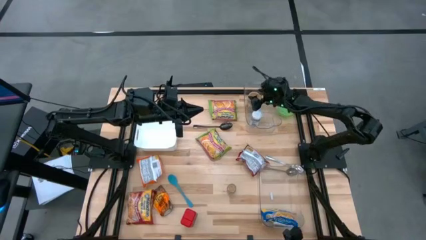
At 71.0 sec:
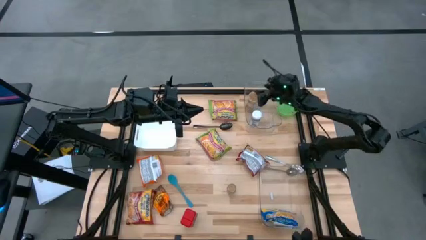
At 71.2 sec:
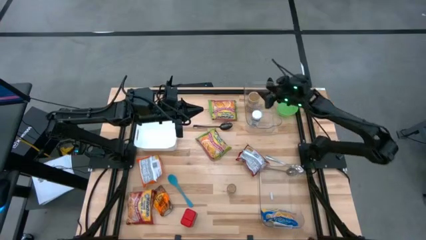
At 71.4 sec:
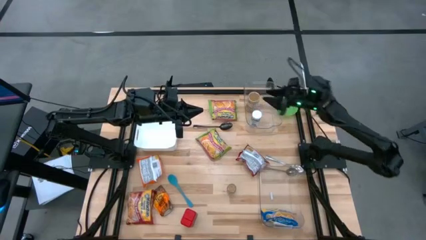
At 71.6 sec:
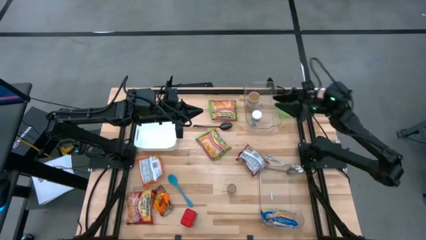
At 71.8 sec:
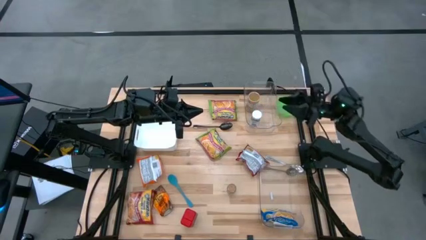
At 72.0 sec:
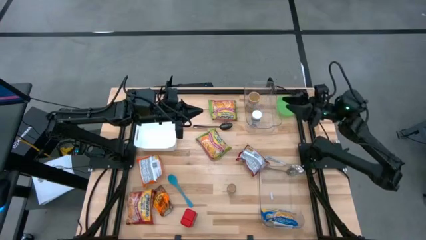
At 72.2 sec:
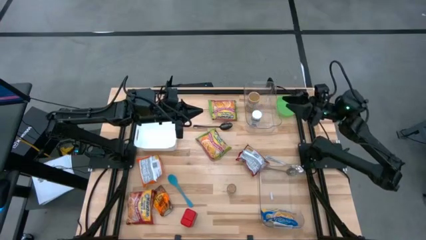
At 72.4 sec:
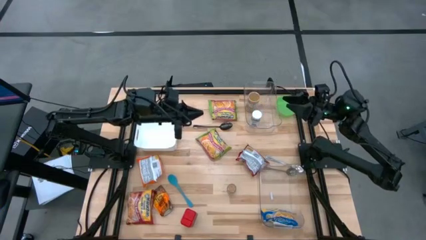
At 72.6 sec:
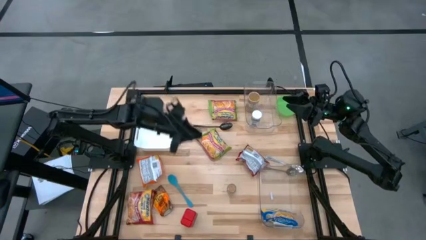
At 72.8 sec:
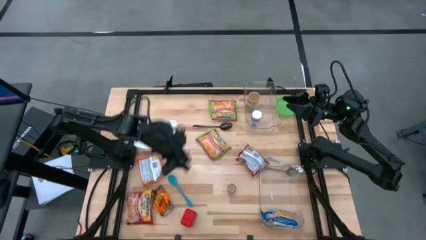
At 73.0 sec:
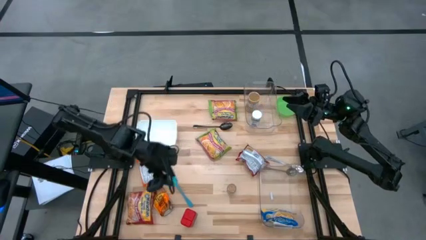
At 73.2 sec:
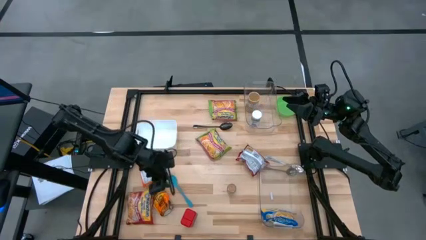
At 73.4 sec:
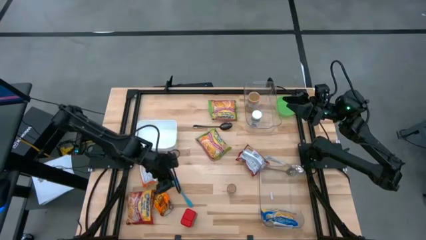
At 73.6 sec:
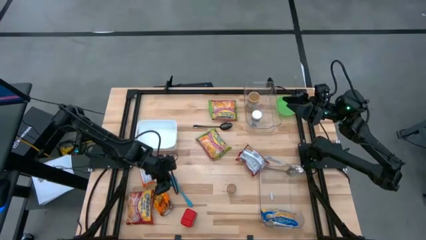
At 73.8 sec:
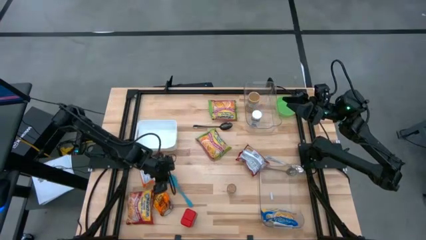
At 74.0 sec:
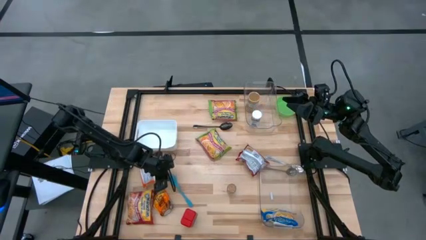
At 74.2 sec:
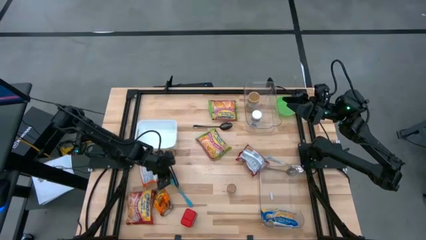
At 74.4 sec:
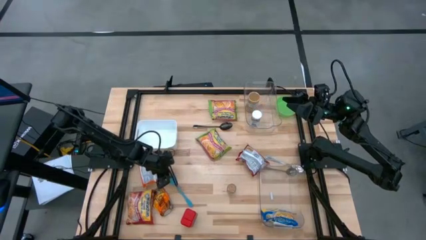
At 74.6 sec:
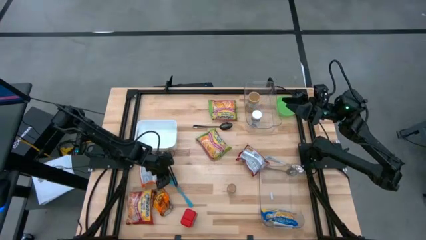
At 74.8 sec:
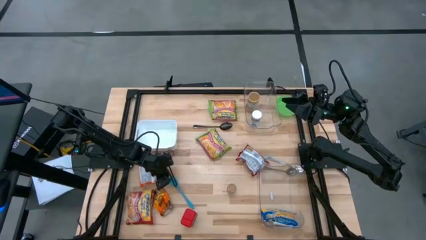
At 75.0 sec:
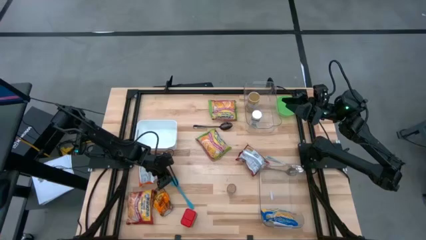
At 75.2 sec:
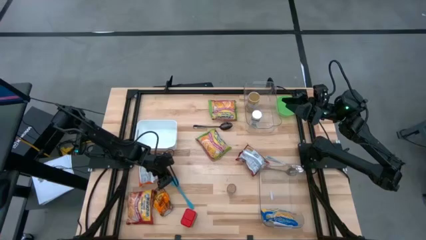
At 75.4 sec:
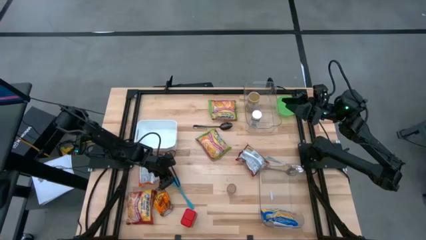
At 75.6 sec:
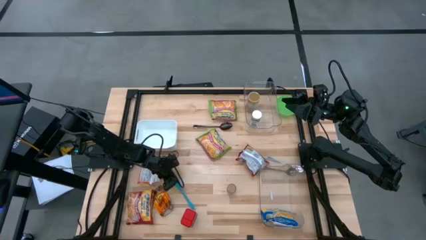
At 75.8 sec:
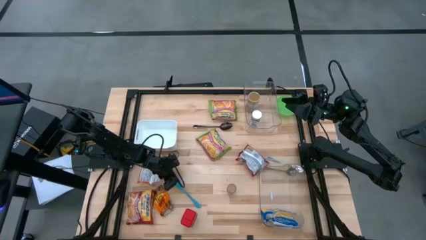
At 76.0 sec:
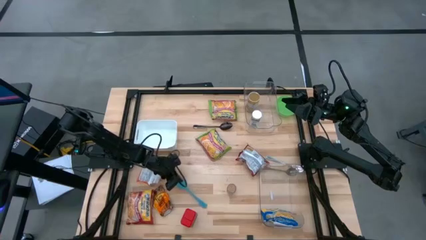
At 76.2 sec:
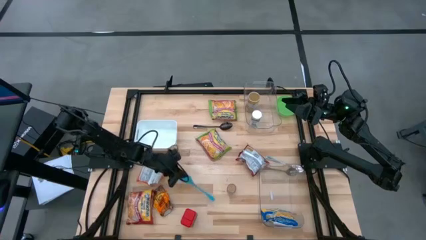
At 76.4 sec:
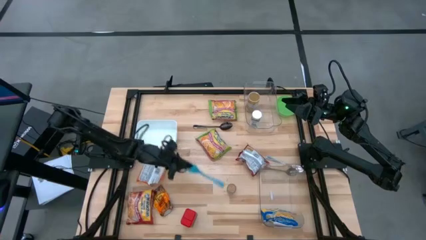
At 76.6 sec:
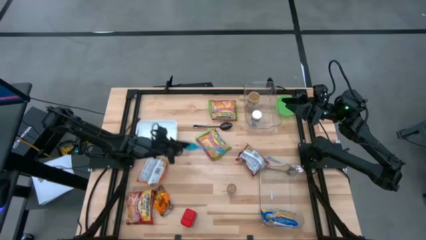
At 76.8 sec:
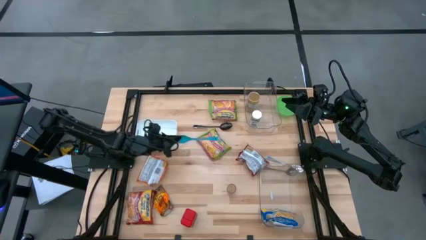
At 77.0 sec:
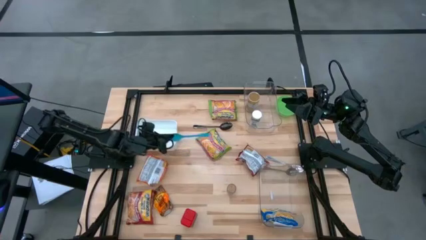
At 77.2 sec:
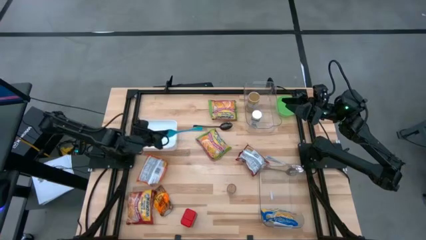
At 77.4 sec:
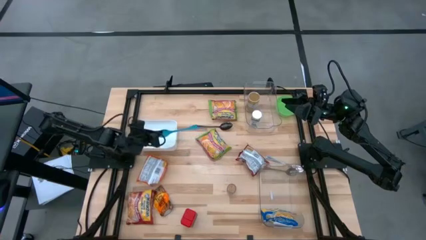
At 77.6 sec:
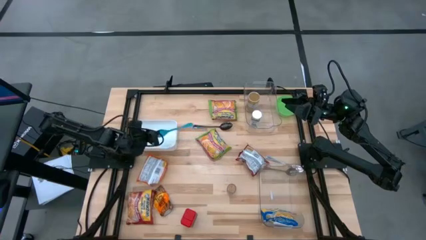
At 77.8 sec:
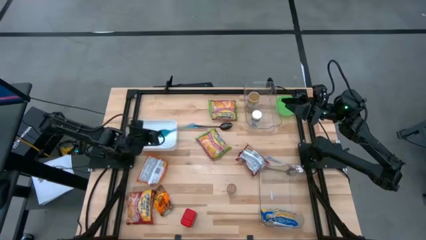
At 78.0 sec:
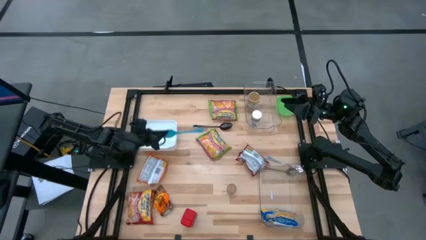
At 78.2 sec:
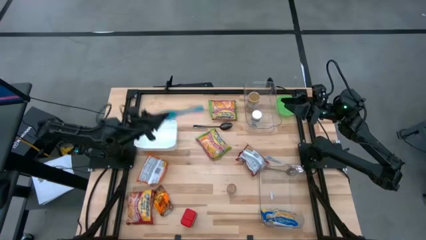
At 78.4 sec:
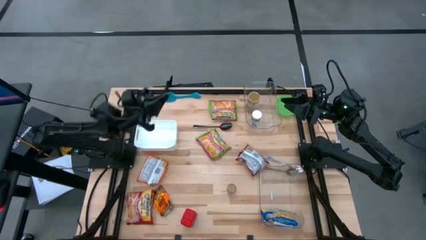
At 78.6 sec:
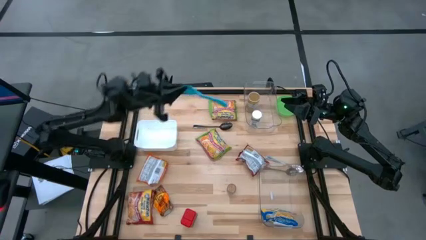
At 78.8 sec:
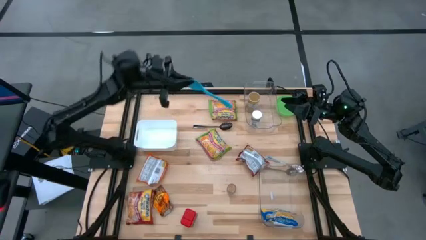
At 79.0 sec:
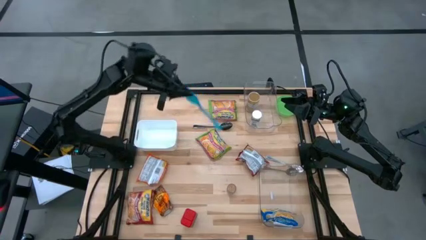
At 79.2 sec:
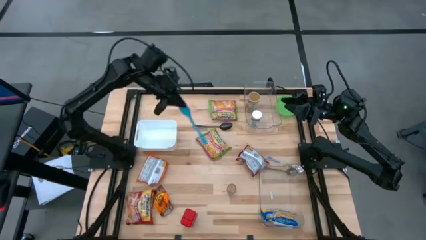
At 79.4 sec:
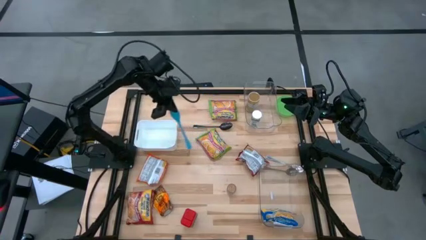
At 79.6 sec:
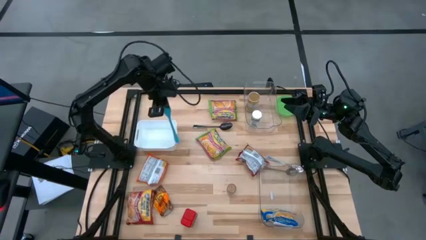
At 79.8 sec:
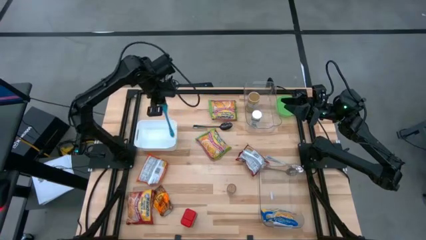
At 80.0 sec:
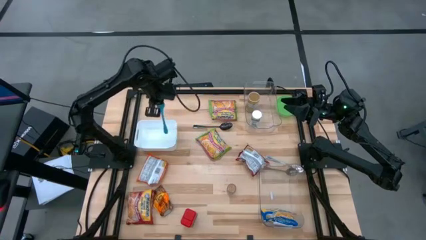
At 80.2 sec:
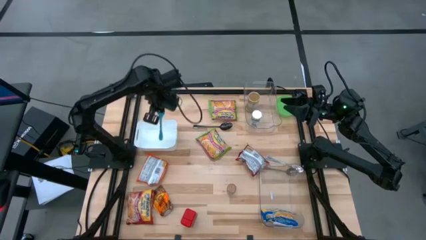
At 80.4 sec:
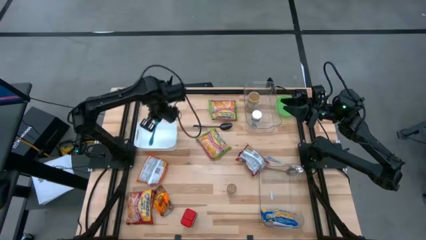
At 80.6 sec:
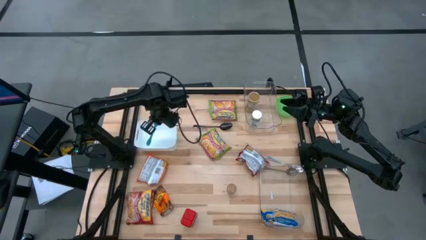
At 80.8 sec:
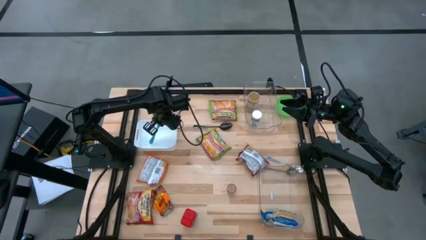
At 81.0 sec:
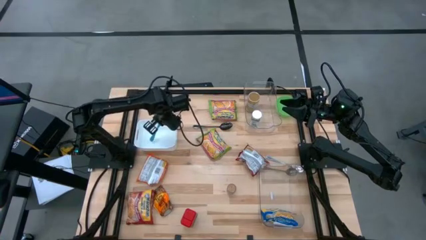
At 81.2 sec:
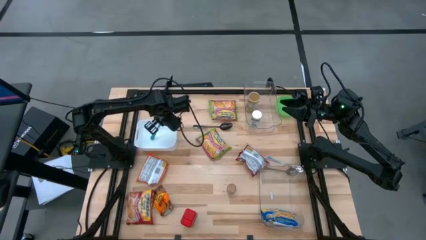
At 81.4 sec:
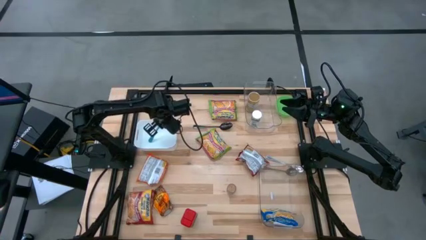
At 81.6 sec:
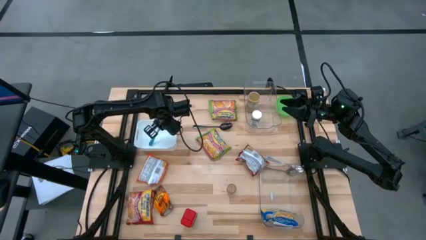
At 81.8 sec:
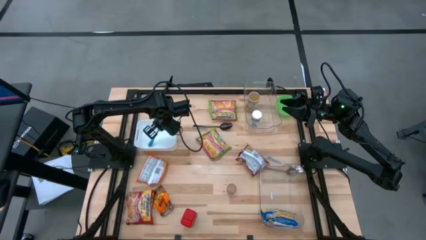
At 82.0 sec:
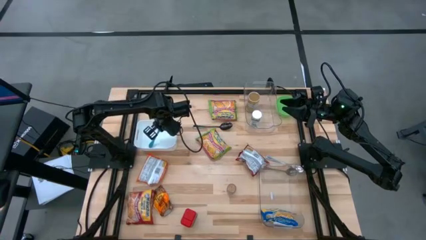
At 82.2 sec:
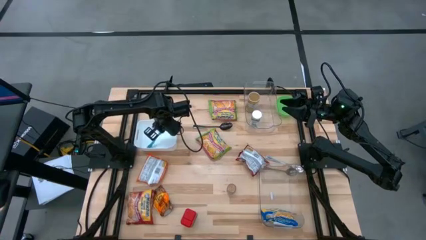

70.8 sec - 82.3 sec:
Task: Pick & Place Food Item
Put the blue spoon into the white bin

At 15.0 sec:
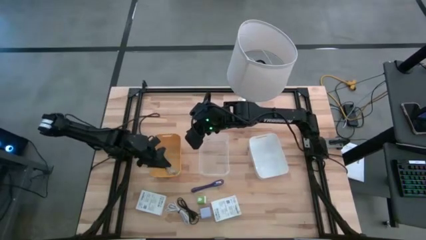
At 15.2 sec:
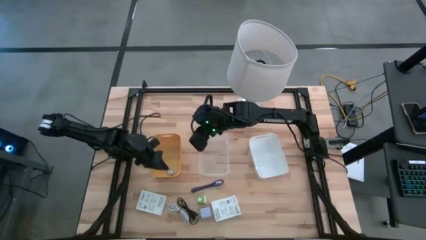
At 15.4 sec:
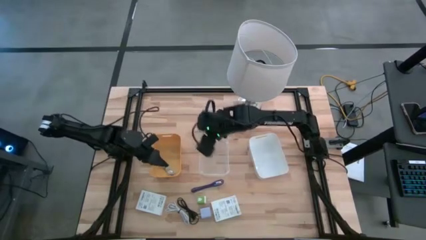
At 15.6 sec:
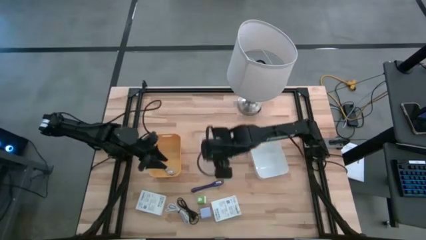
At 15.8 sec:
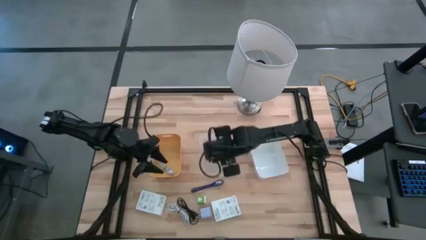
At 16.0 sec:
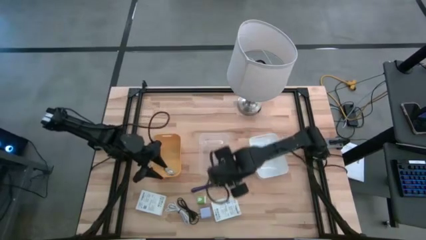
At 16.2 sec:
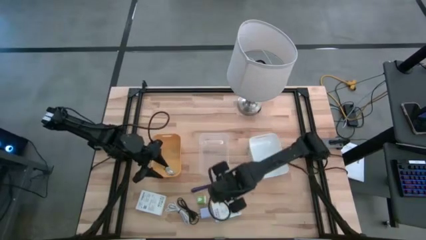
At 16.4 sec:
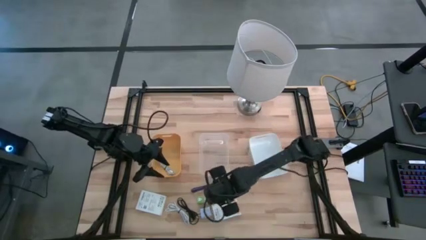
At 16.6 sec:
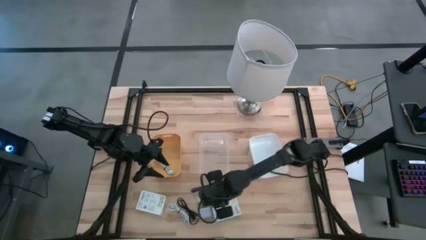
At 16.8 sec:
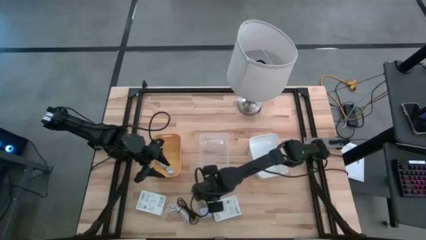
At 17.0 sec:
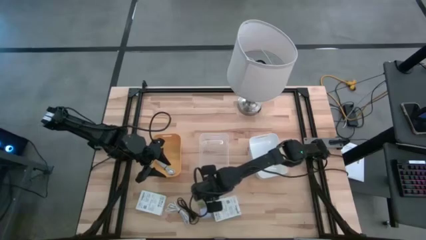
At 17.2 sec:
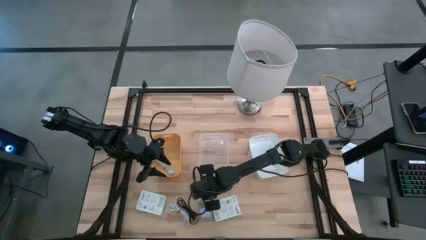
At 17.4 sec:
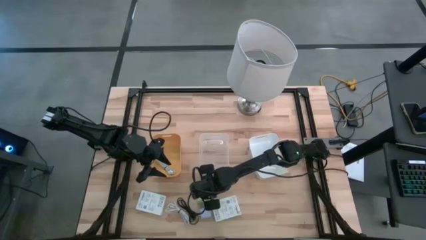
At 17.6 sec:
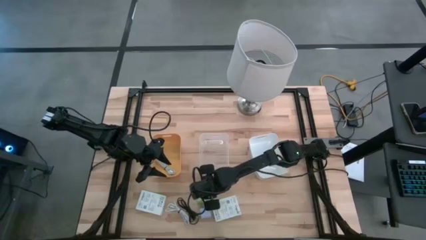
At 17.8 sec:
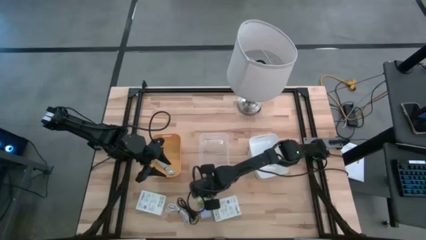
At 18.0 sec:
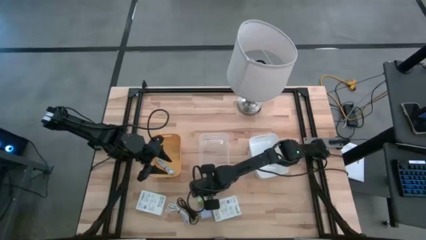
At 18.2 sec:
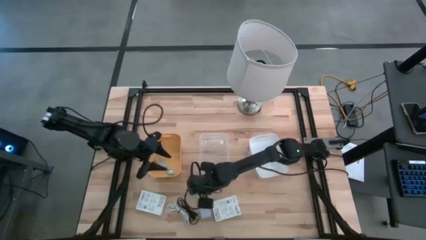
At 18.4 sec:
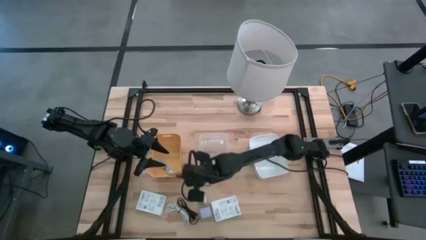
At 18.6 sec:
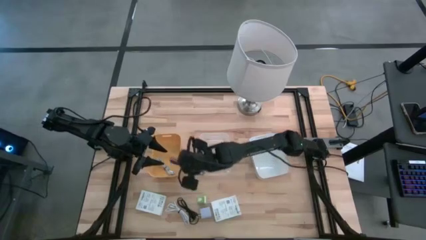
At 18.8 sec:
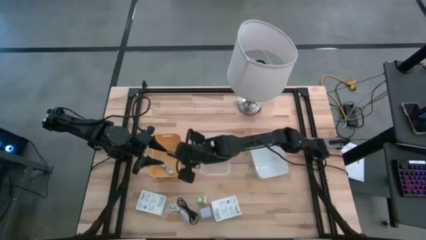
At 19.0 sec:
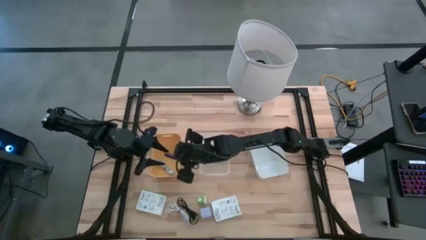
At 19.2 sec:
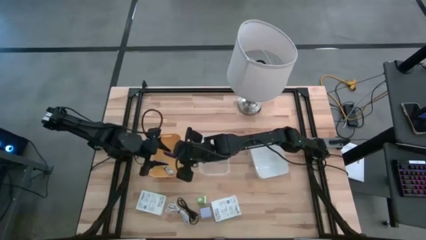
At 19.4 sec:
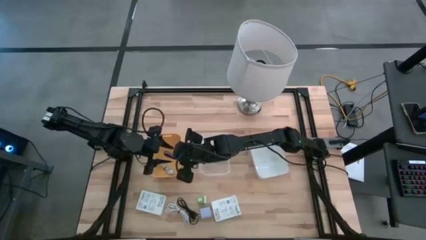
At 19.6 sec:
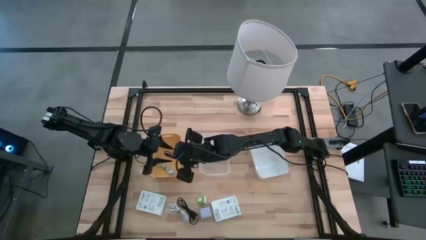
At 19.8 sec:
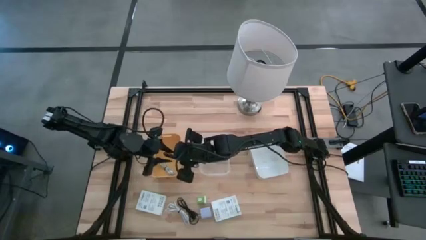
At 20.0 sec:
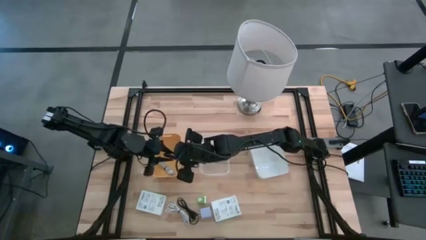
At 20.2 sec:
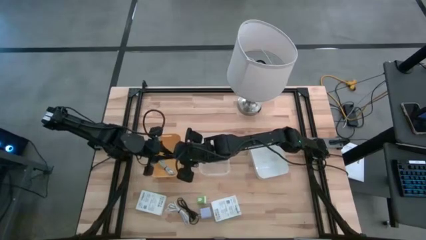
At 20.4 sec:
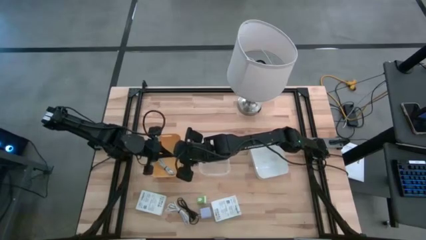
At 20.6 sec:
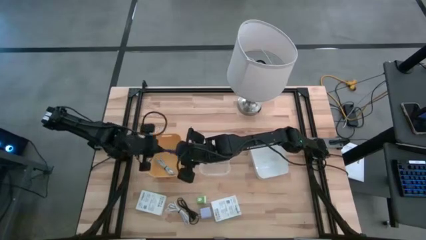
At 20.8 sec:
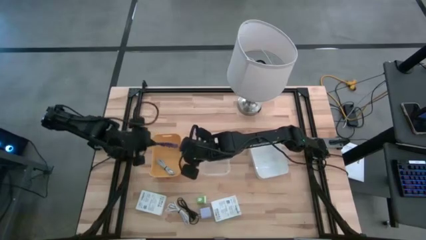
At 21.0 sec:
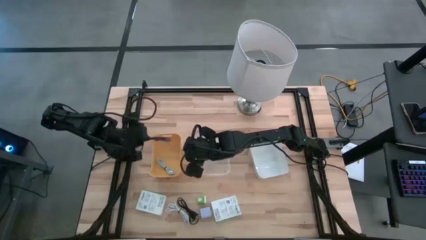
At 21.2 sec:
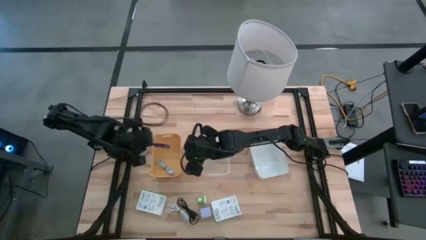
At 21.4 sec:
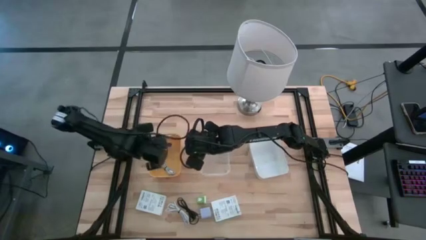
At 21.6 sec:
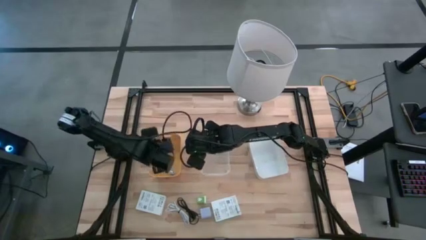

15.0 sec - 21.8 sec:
Task: Pick and place items into bin
Put the purple charger cable into the yellow bin
